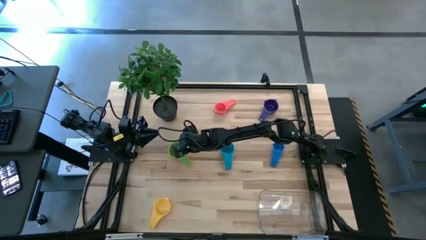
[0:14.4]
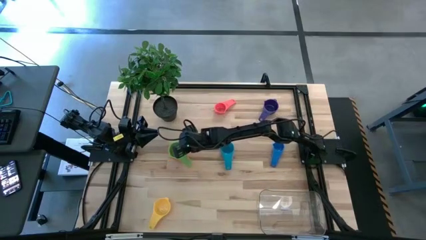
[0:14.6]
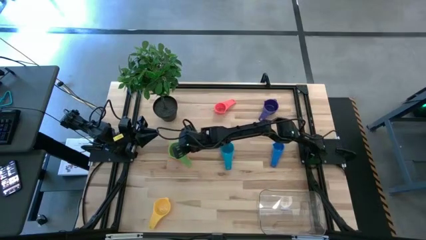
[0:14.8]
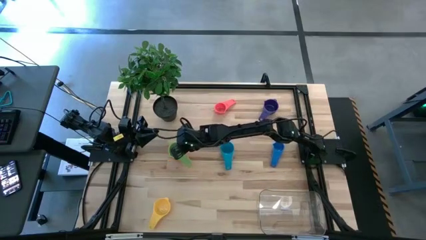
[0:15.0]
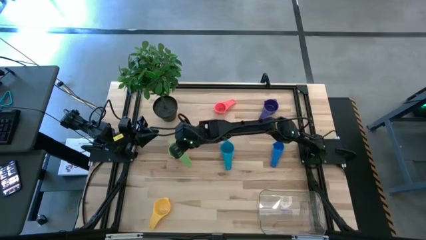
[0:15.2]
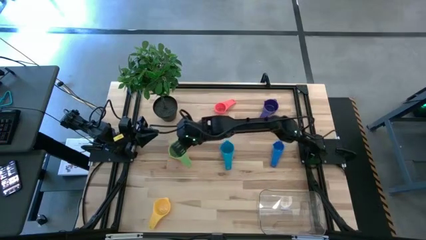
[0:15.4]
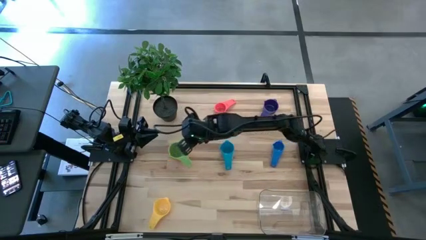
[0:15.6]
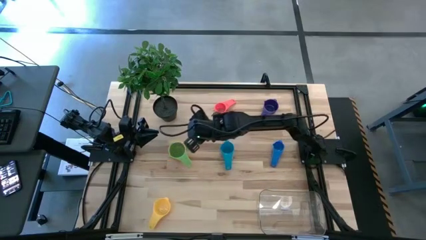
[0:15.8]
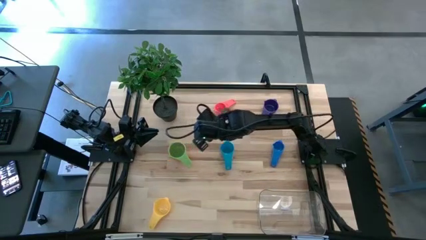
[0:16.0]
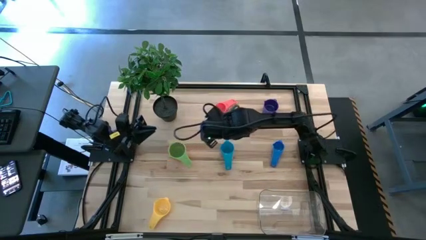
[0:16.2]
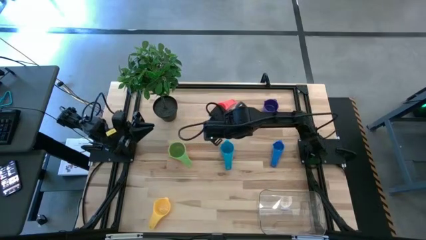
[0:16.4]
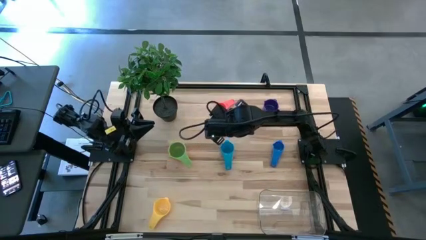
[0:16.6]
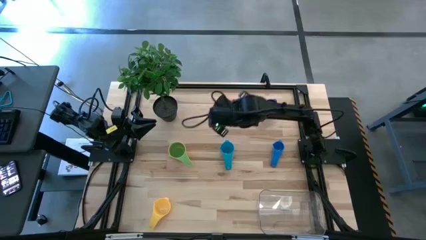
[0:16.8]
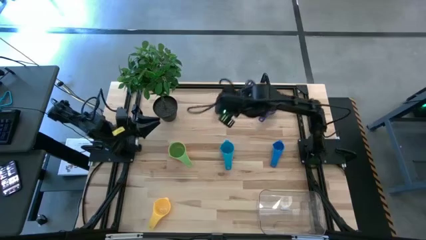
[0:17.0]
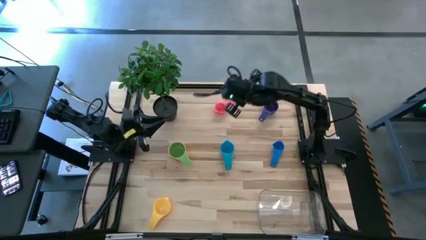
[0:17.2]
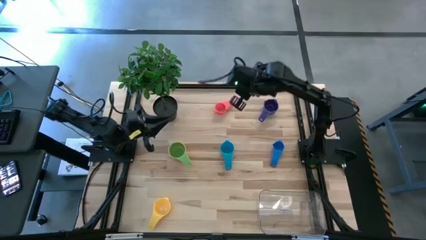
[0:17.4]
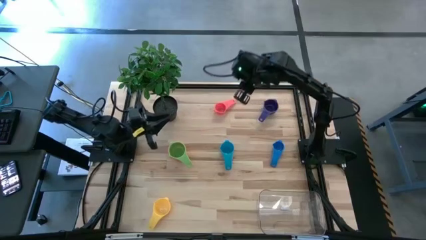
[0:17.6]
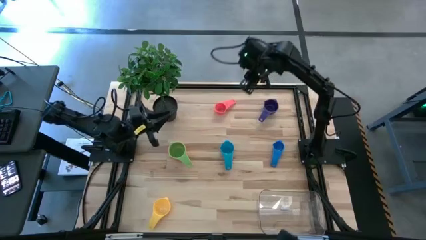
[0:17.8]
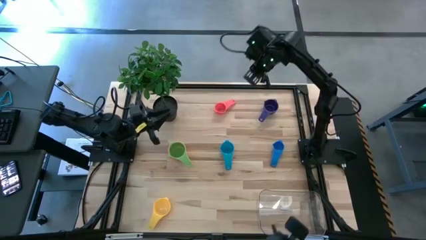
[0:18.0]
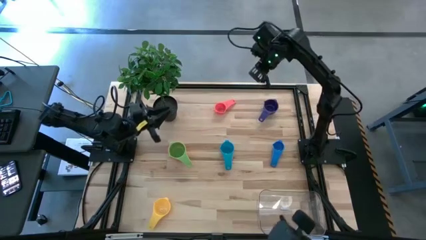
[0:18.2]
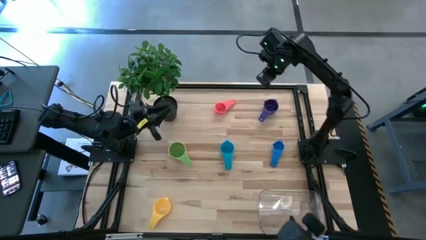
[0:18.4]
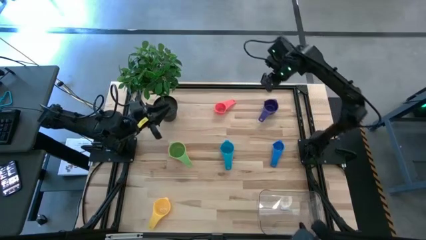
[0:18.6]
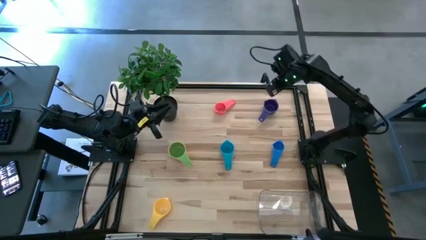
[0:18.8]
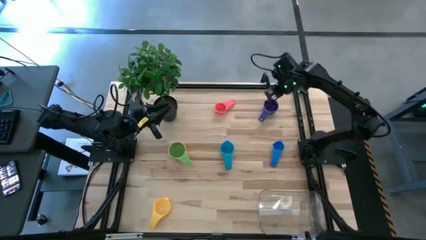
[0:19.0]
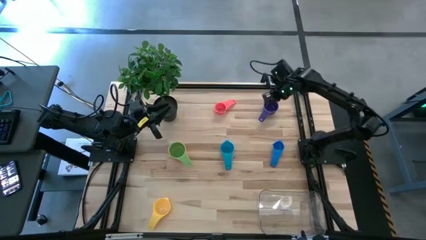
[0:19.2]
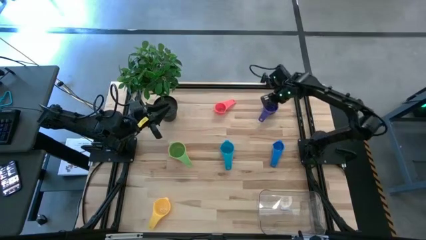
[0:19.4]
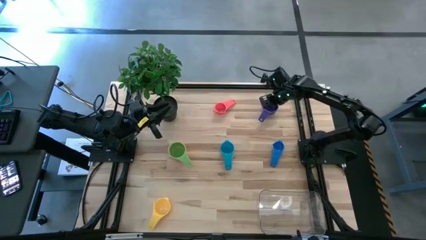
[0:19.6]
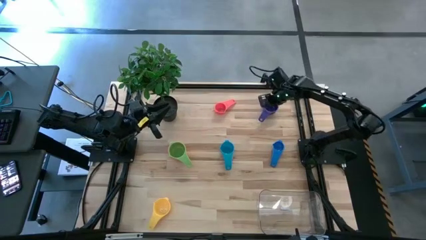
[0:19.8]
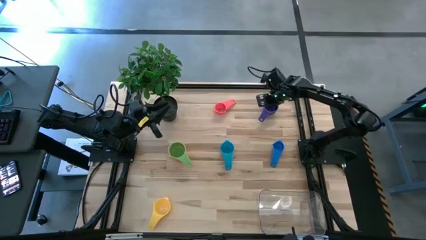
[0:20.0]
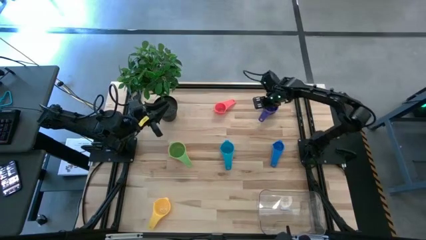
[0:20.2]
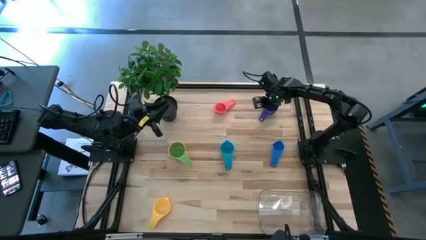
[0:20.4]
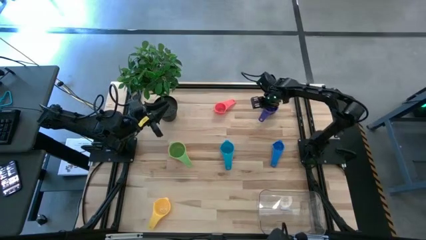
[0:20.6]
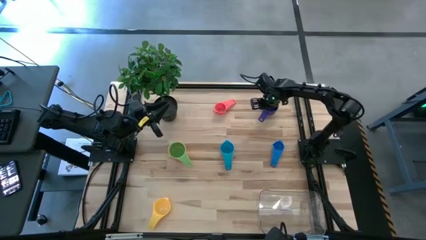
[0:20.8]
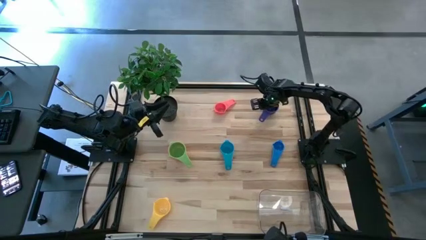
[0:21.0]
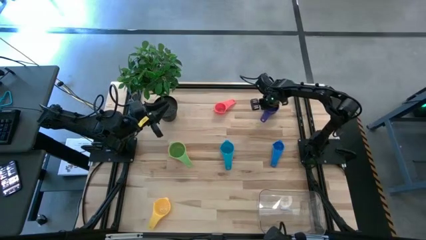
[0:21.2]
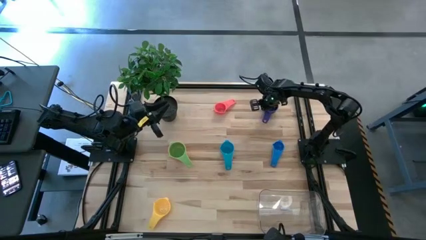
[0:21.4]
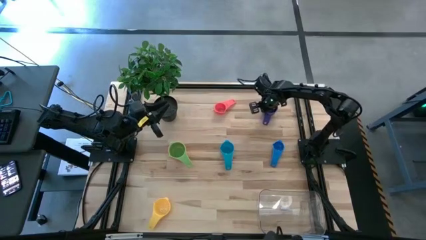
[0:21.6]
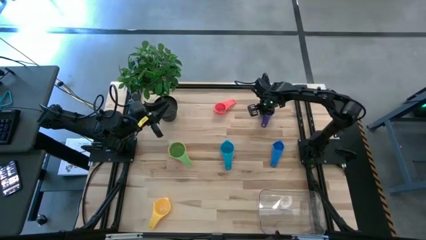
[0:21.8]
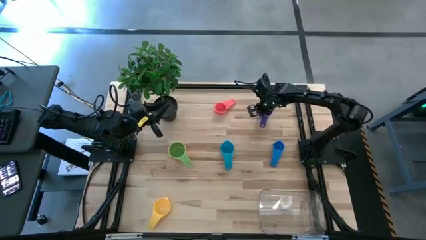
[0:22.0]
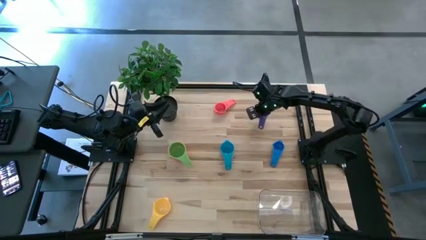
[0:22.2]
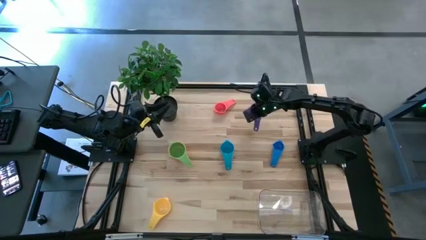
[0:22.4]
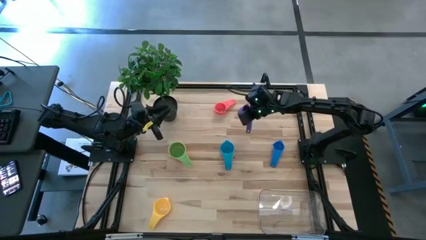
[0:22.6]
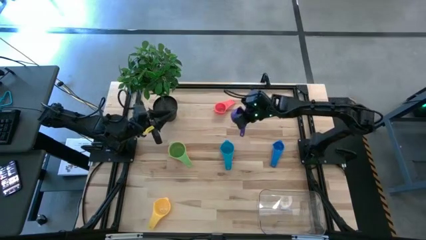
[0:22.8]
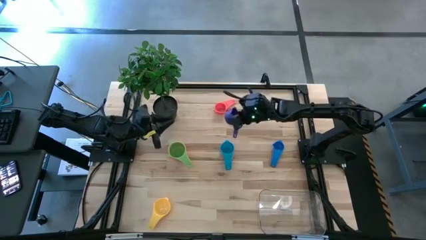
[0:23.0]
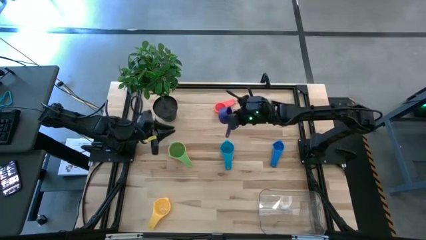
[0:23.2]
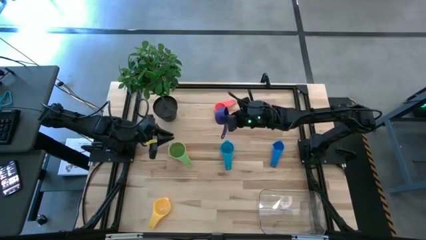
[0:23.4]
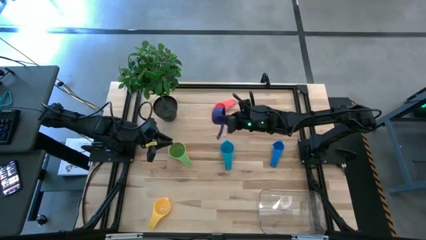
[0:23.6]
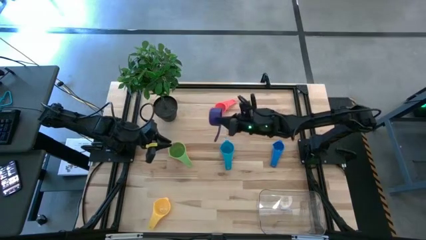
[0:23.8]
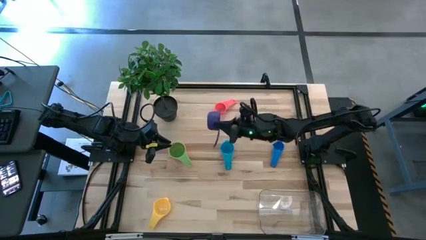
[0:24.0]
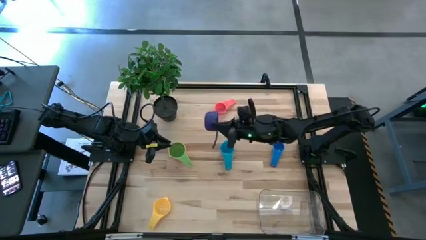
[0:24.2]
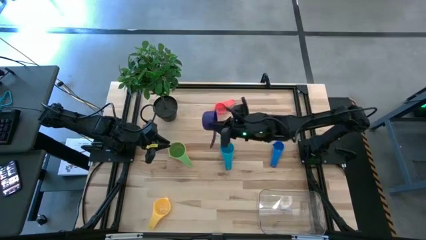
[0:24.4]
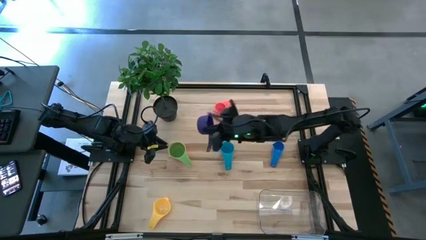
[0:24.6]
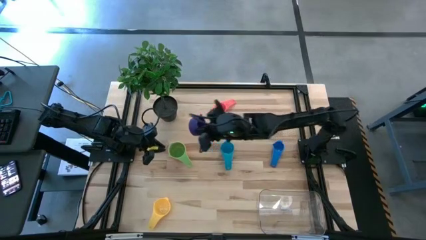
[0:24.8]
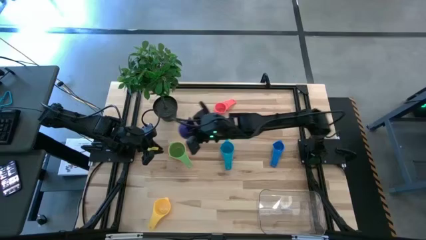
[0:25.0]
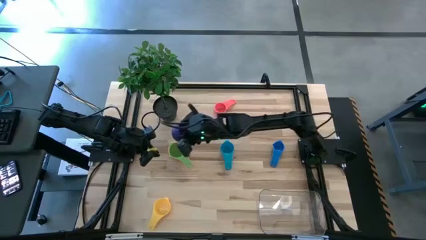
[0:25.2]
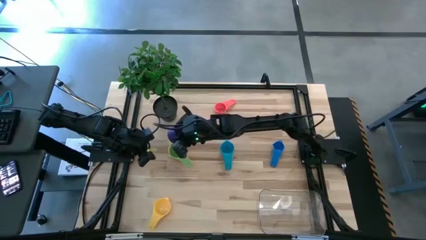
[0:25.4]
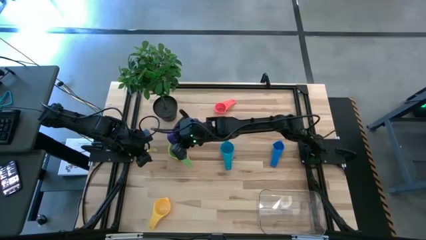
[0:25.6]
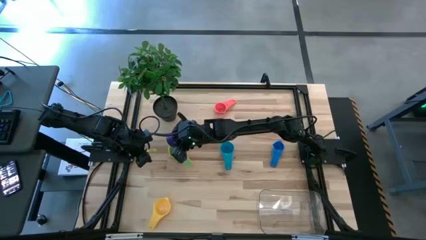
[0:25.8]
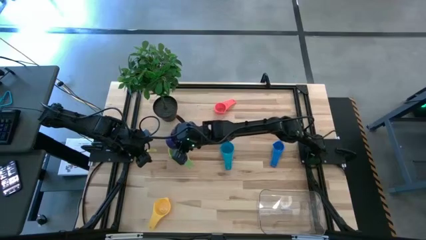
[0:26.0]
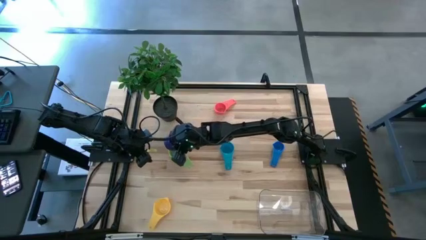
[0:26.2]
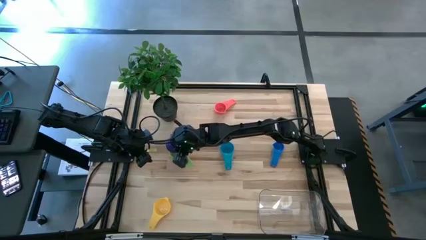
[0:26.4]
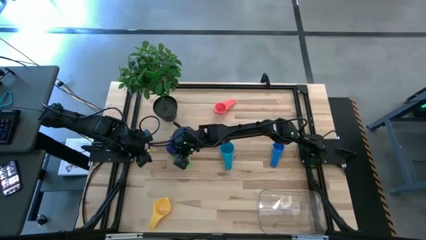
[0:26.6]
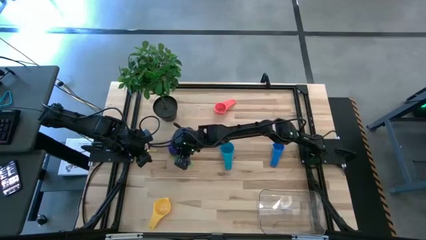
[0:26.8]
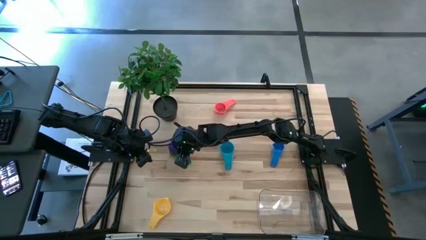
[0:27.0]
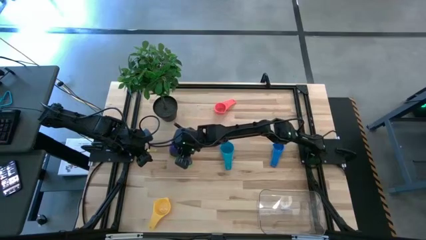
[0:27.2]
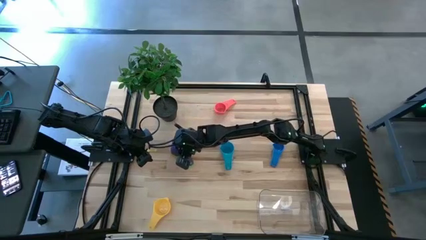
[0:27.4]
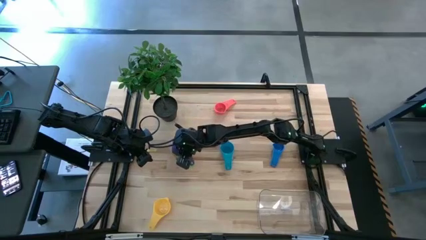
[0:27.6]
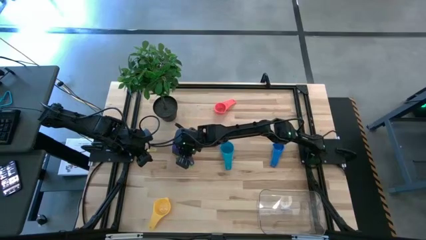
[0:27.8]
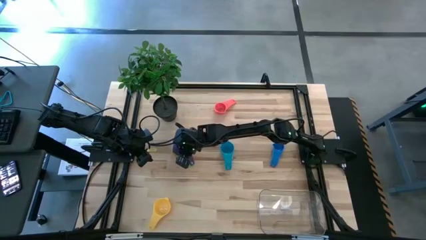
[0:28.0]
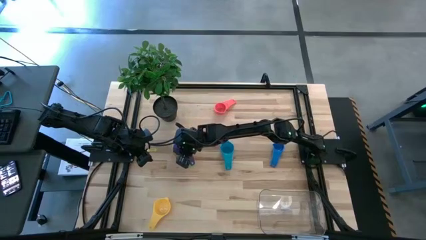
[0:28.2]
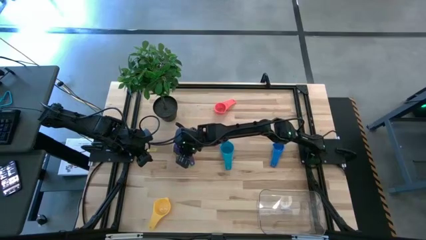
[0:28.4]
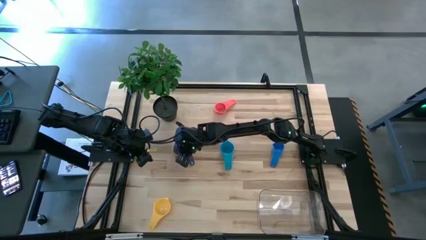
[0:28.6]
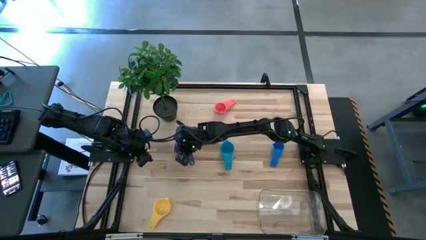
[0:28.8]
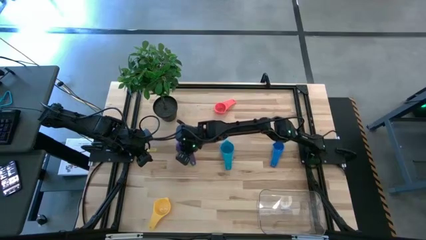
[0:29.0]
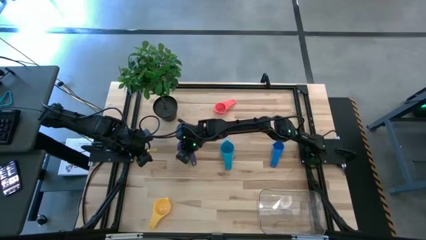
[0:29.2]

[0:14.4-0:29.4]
Task: Nest measuring cups in basket
Stack the violet measuring cup on the green measuring cup
